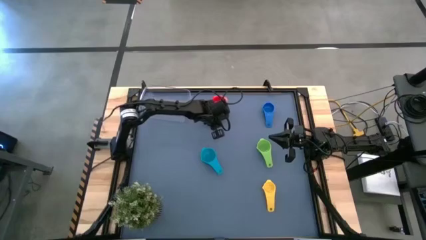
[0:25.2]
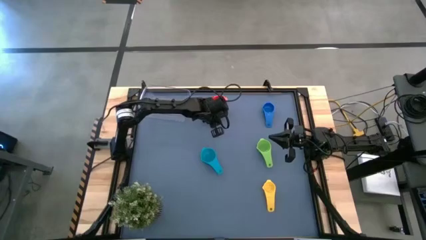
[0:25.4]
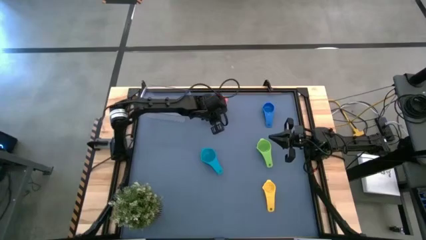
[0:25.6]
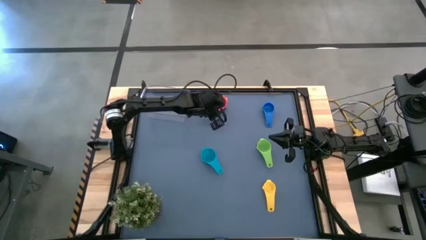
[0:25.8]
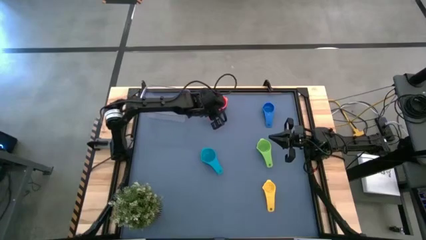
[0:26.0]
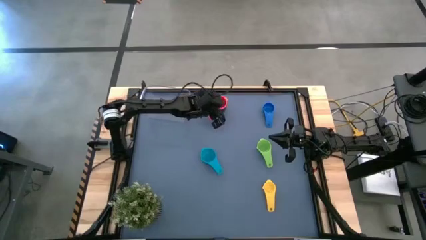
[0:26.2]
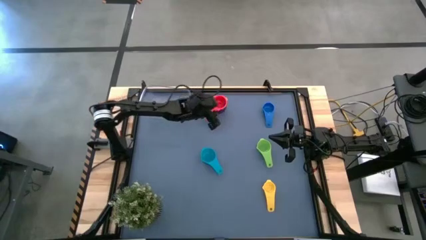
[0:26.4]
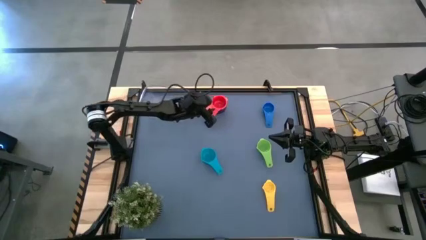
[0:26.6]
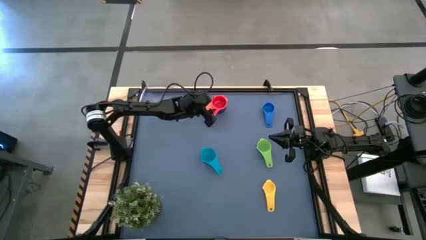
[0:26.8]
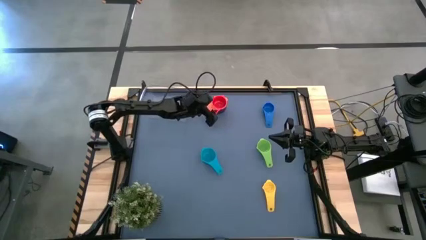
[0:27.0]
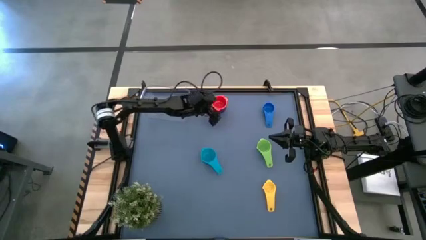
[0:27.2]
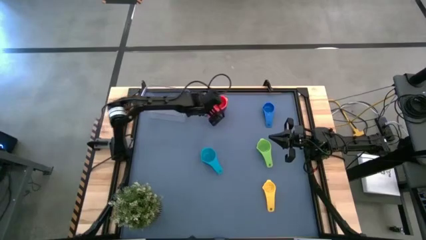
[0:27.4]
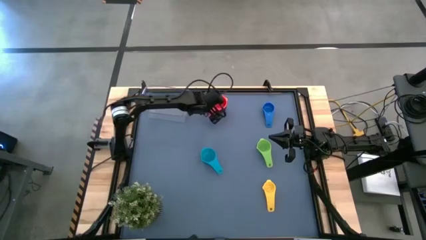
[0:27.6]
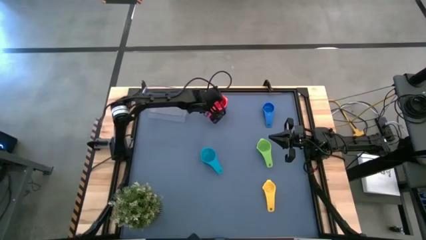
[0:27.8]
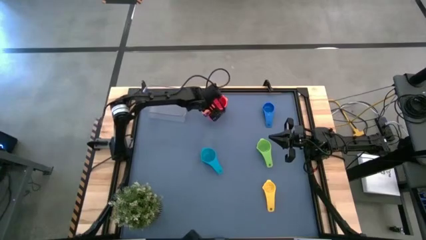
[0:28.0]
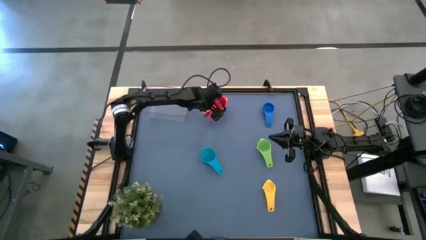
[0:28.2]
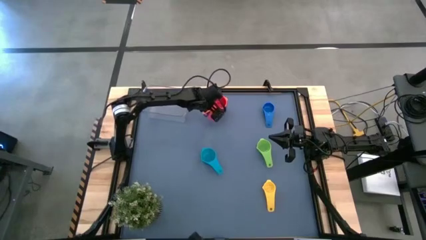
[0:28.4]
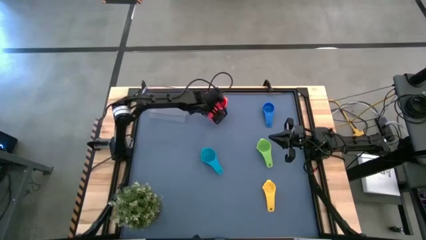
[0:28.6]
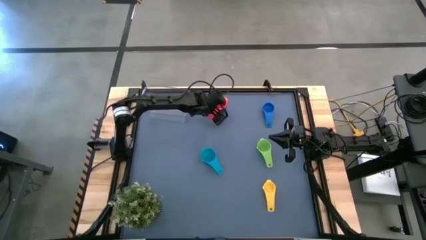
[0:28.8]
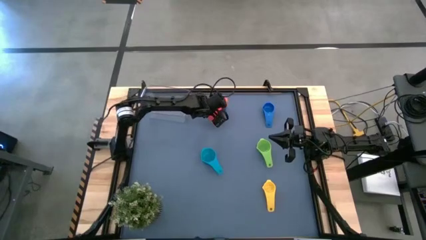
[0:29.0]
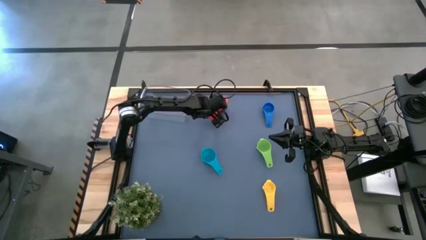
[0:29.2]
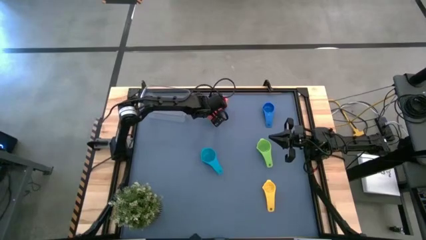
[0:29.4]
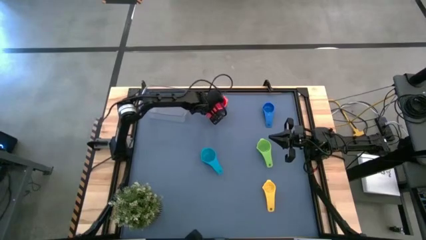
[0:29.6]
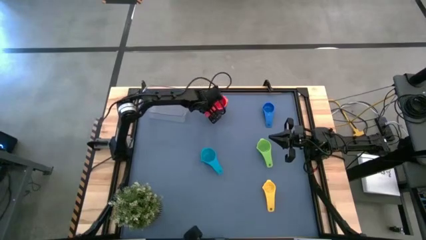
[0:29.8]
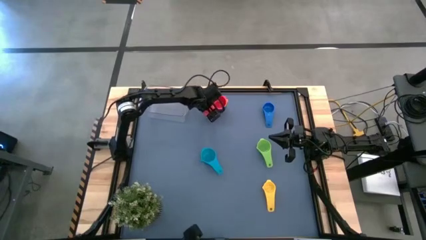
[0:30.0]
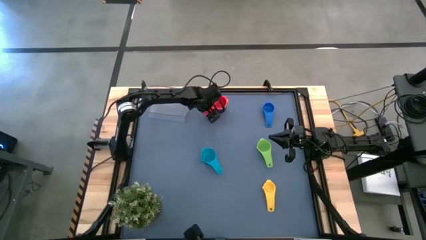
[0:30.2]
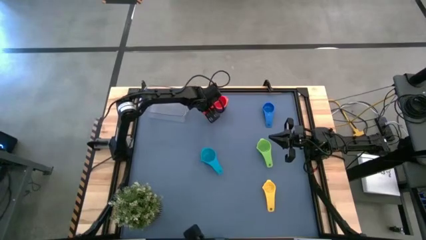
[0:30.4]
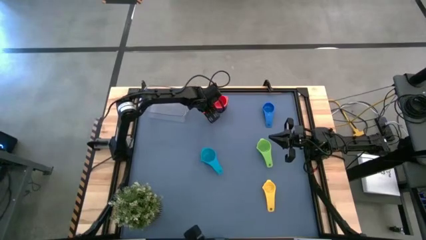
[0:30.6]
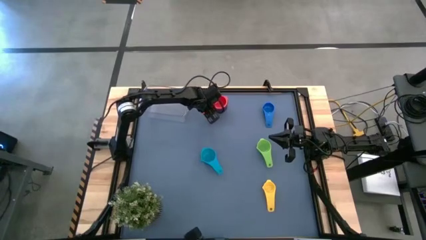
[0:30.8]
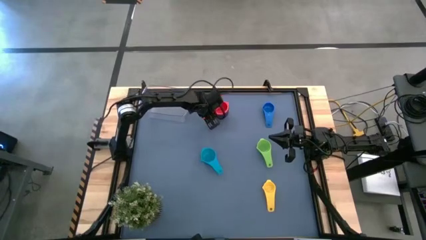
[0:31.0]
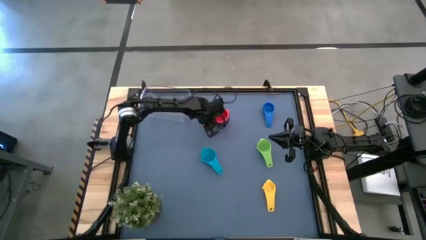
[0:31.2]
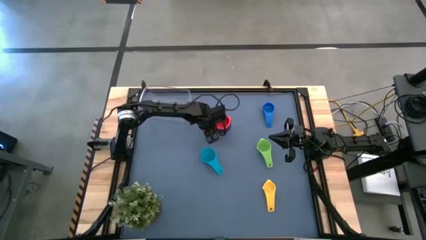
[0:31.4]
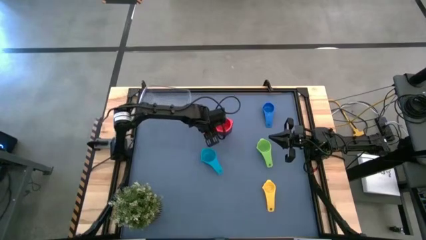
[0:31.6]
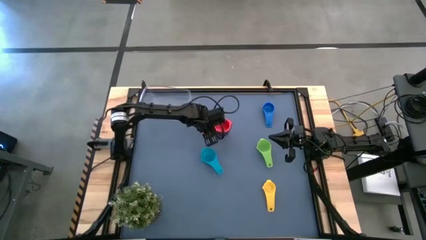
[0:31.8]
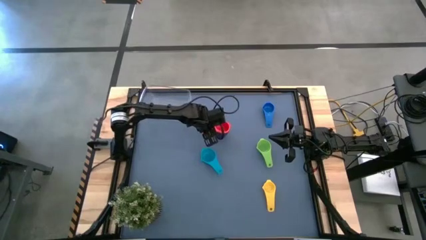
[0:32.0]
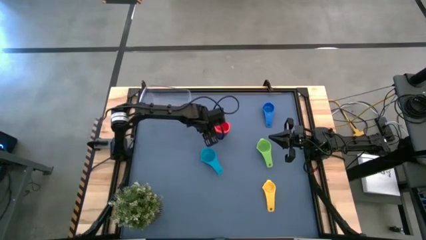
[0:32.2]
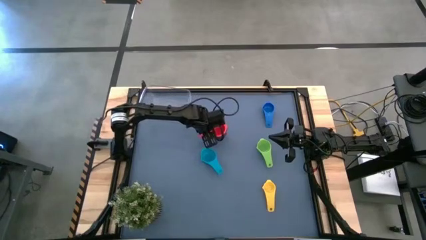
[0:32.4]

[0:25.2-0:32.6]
Task: Nest measuring cups in basket
Adjust the nested measuring cups

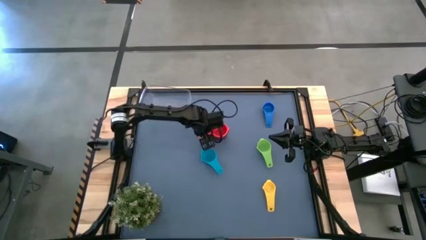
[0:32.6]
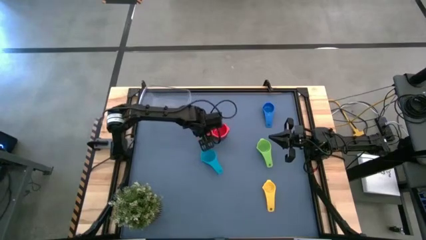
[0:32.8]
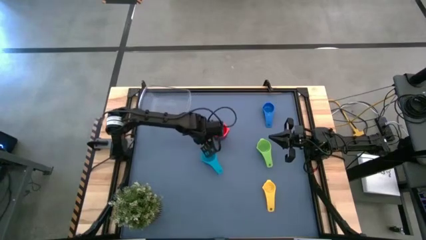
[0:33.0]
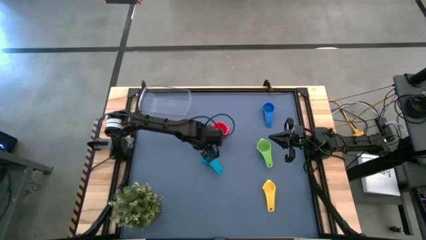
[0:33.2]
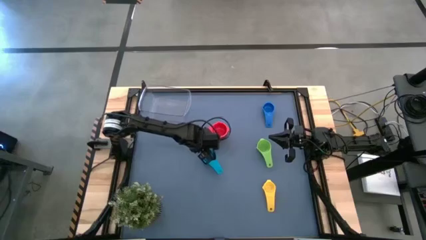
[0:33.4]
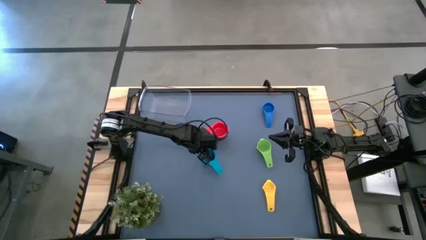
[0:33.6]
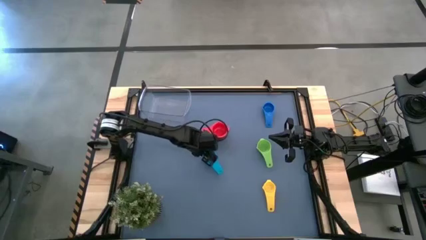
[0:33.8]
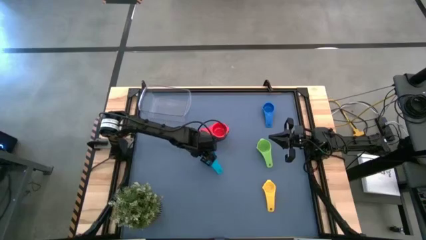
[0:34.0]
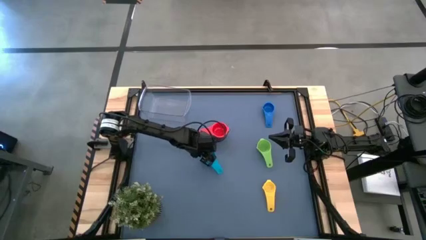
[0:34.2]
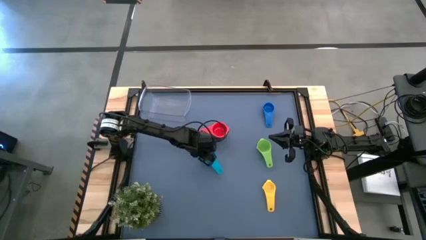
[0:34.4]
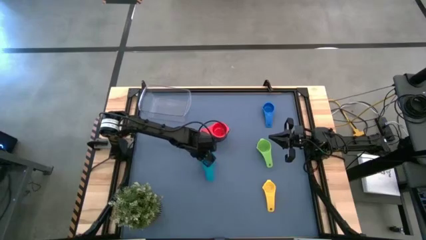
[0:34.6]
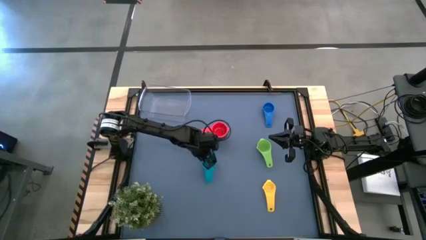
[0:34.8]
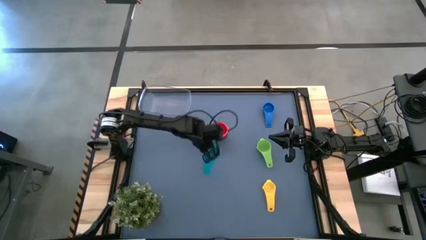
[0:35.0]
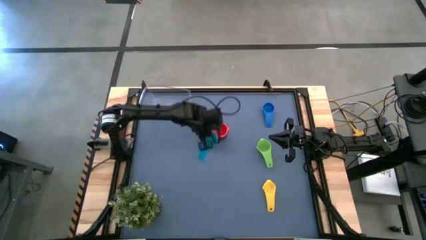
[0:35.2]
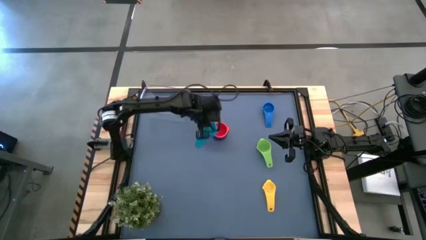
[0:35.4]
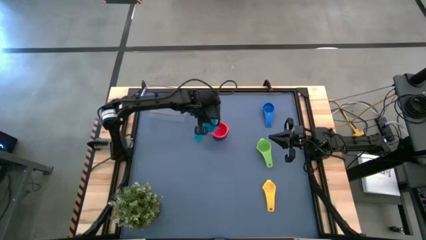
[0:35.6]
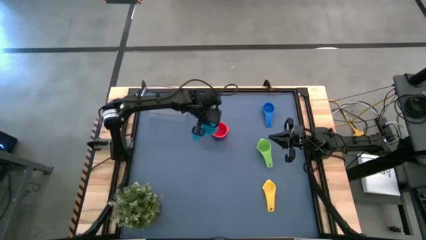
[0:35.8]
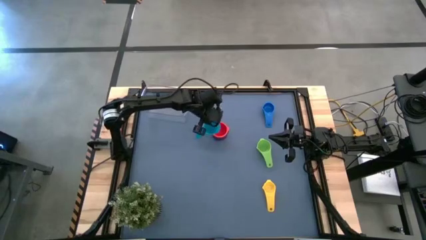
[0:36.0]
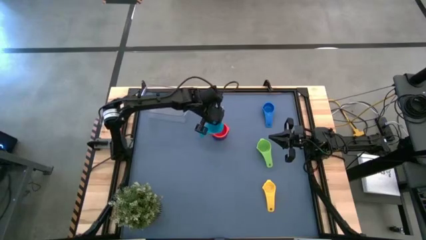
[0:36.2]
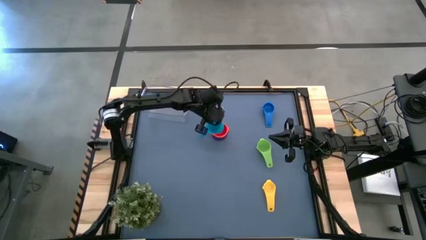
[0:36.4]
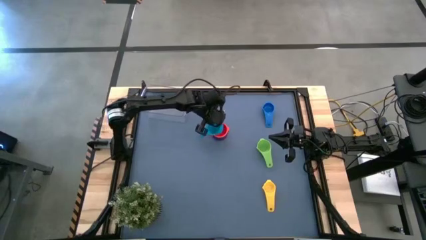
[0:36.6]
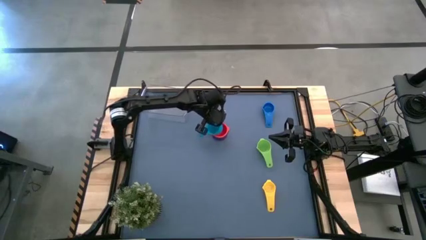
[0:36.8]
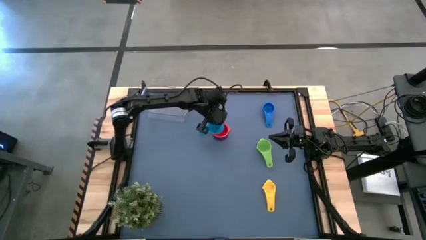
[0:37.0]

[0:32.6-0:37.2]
Stack the light blue measuring cup on top of the red measuring cup

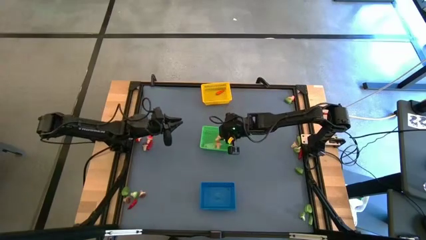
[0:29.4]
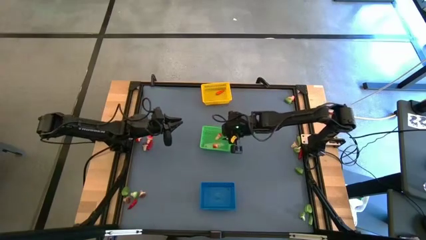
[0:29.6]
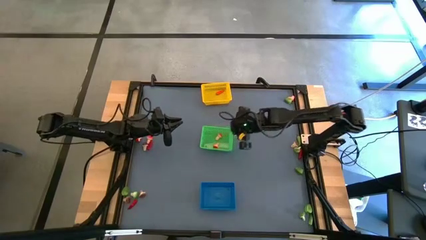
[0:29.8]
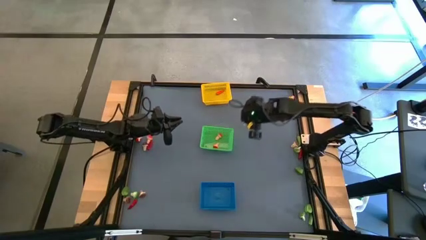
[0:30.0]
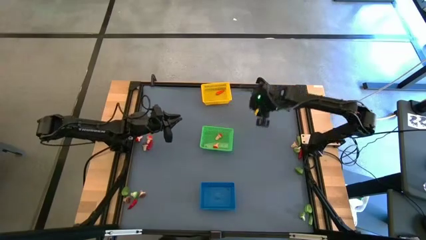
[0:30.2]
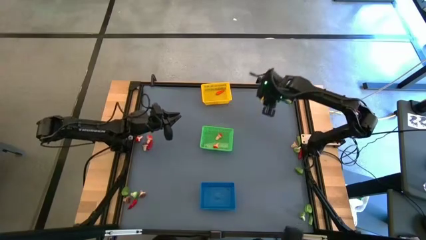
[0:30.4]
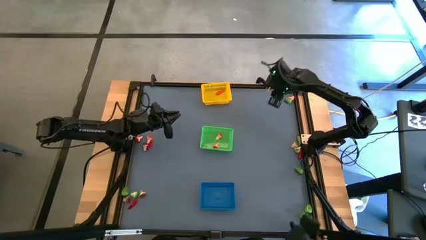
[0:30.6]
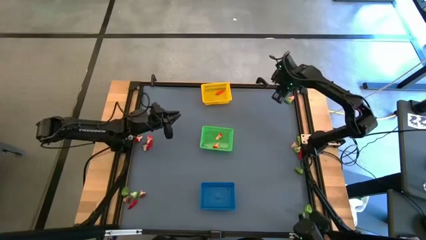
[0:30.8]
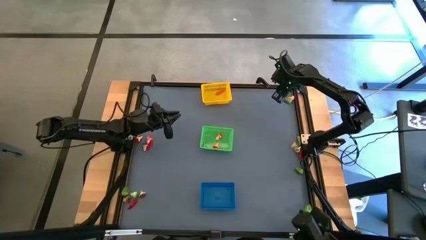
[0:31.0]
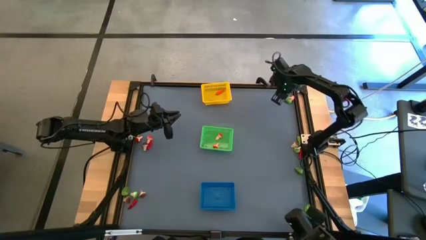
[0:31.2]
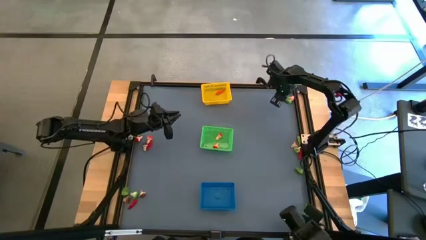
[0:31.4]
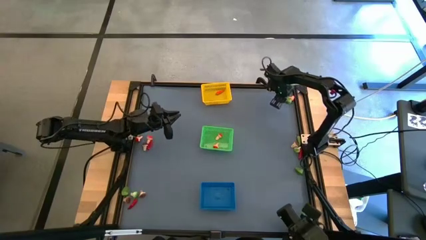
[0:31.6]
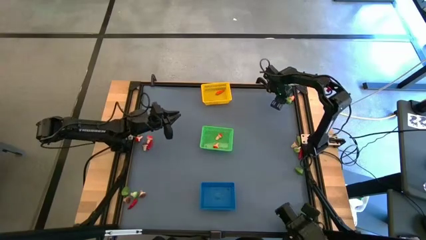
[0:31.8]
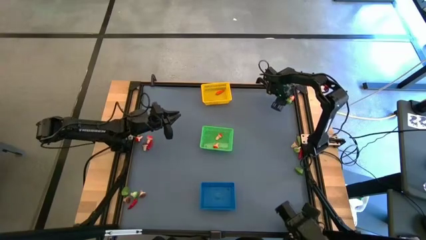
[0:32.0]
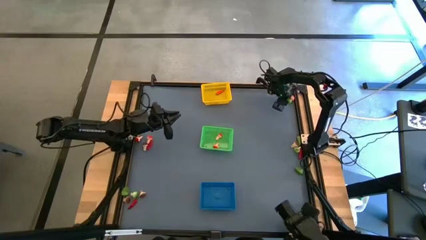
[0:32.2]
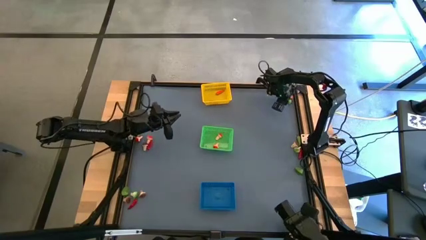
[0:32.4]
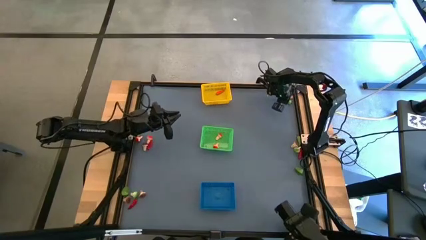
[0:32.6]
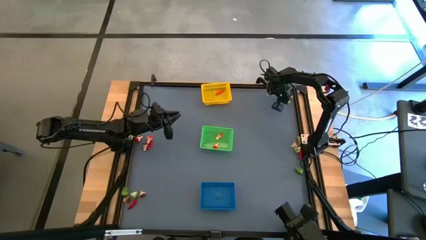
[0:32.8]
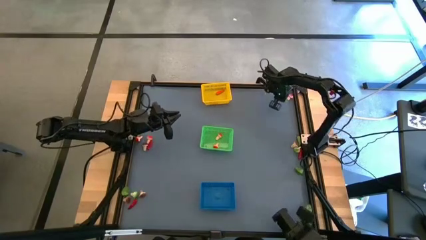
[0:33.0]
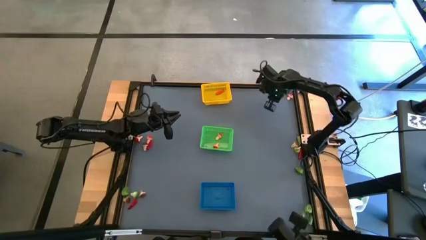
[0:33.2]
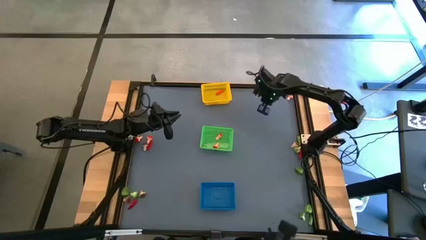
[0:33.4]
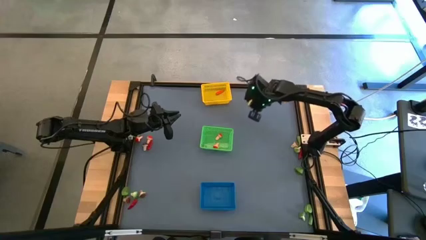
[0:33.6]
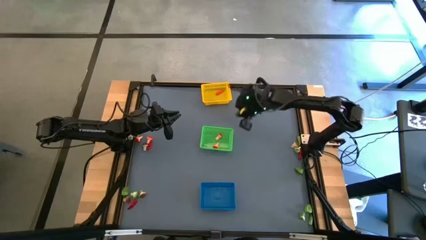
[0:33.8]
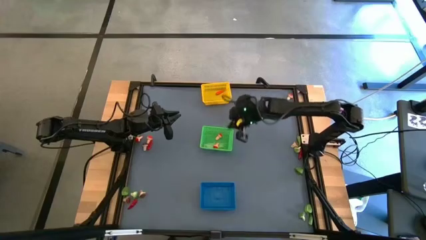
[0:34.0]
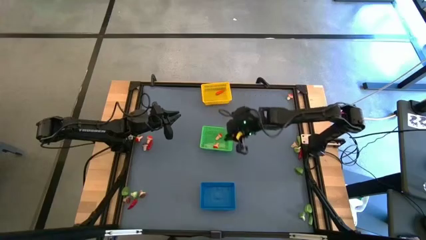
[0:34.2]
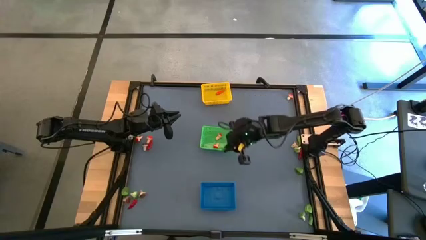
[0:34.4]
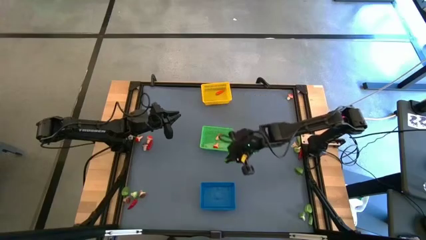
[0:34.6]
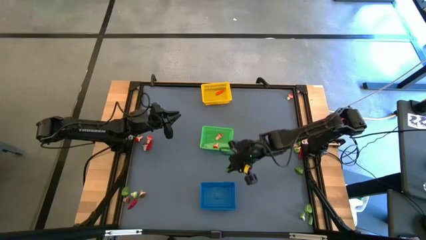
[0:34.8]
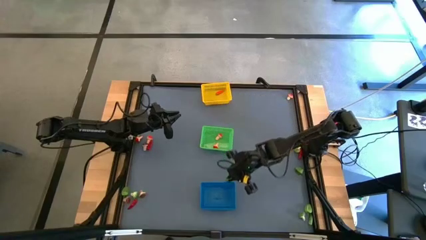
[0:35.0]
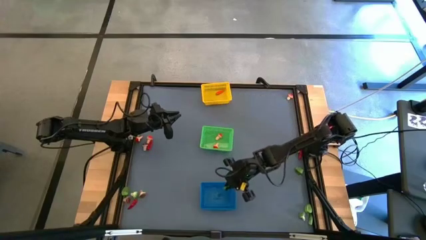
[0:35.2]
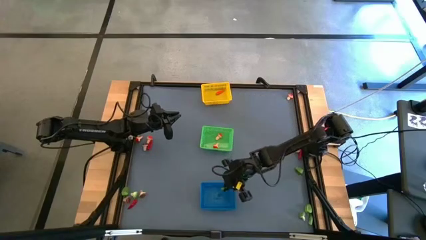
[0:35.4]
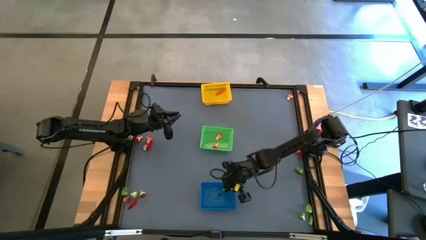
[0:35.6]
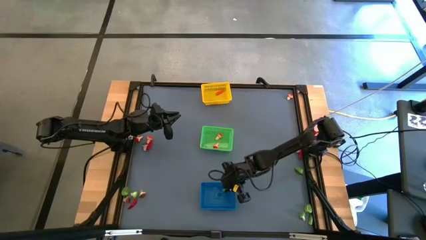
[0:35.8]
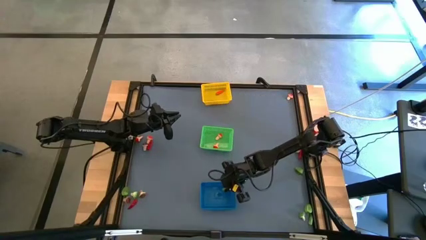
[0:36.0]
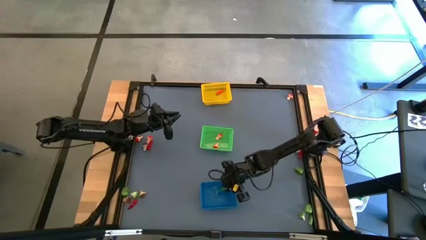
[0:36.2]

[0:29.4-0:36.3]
Task: Sort produce into baskets
Put the green chili pepper into the blue bin
